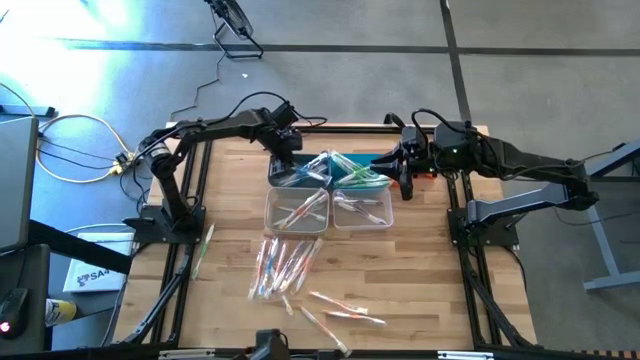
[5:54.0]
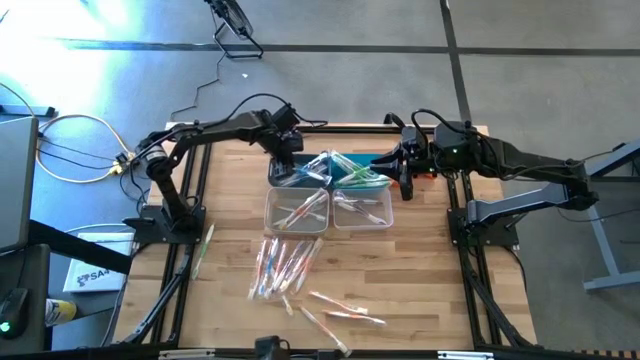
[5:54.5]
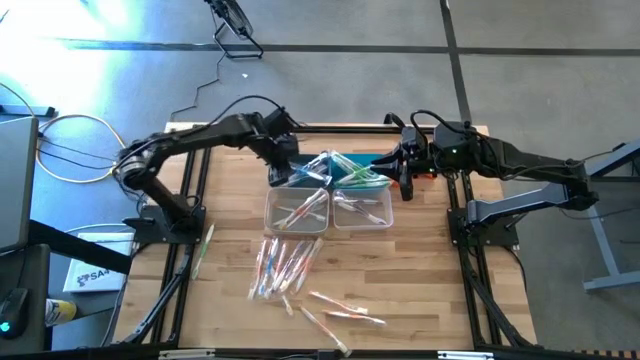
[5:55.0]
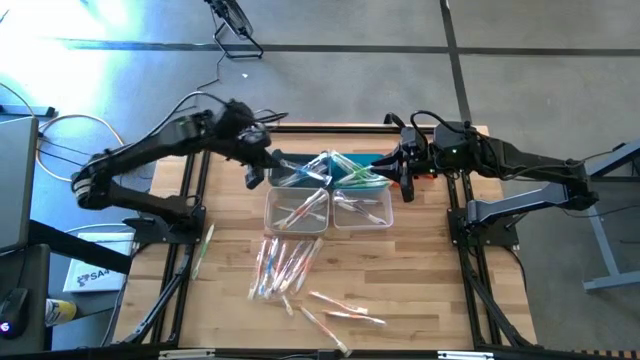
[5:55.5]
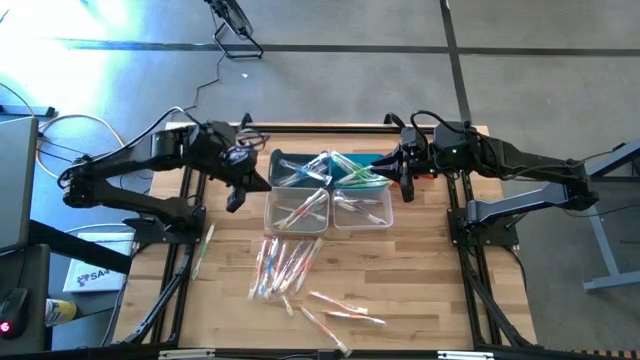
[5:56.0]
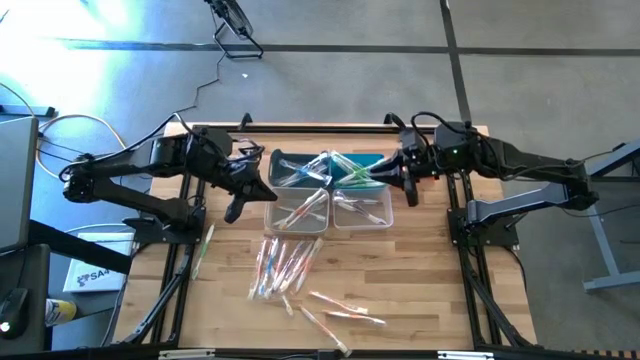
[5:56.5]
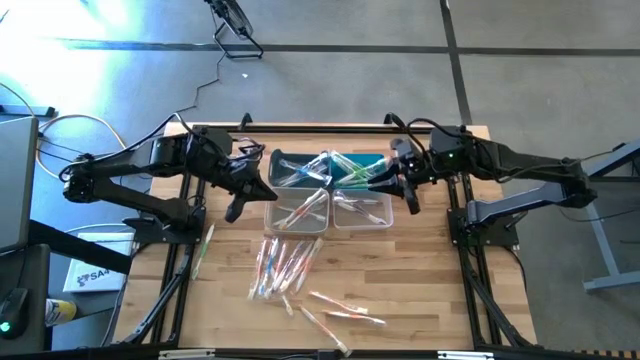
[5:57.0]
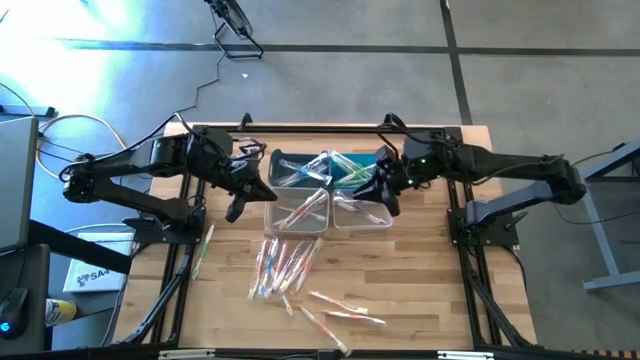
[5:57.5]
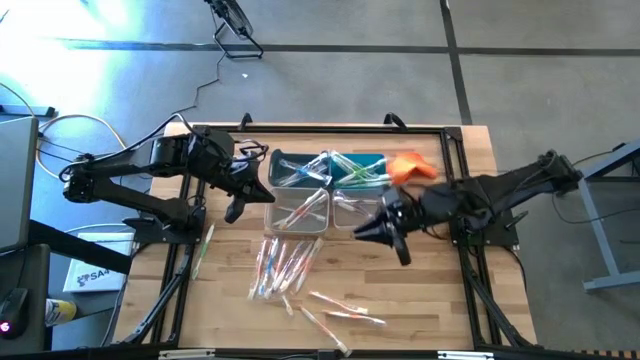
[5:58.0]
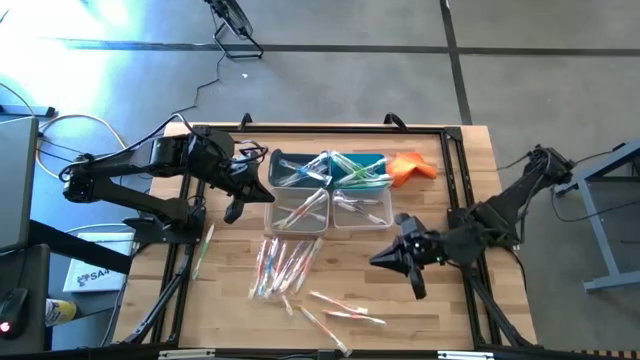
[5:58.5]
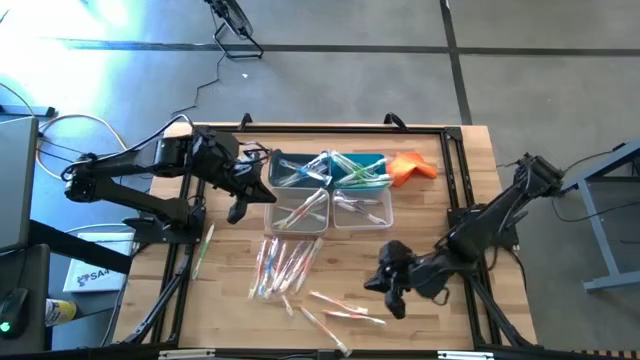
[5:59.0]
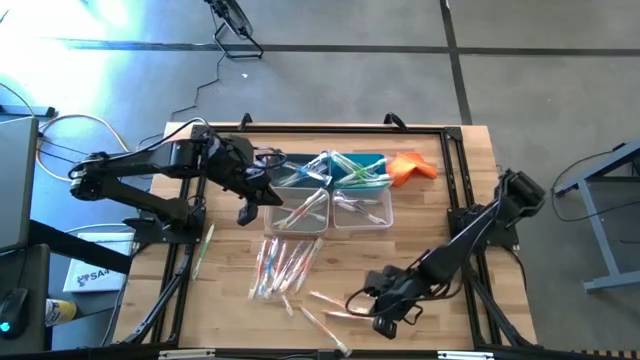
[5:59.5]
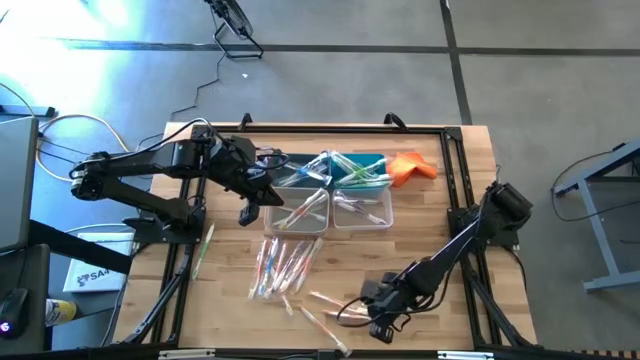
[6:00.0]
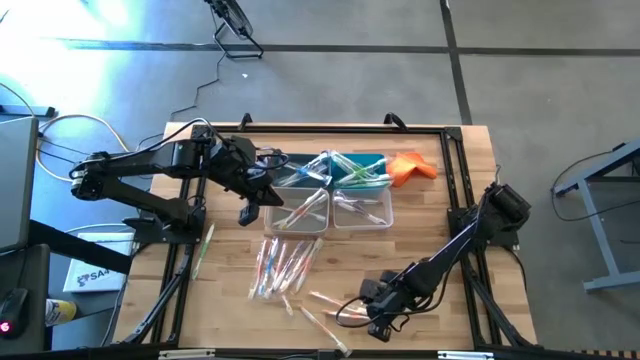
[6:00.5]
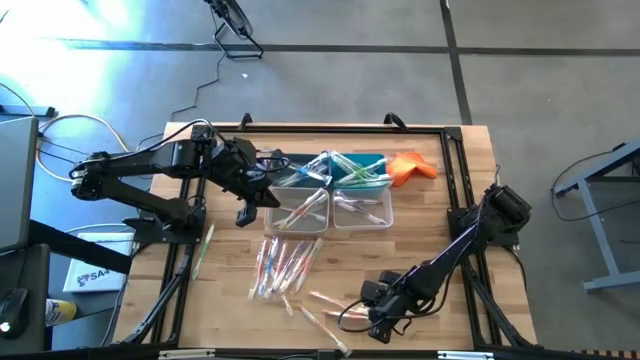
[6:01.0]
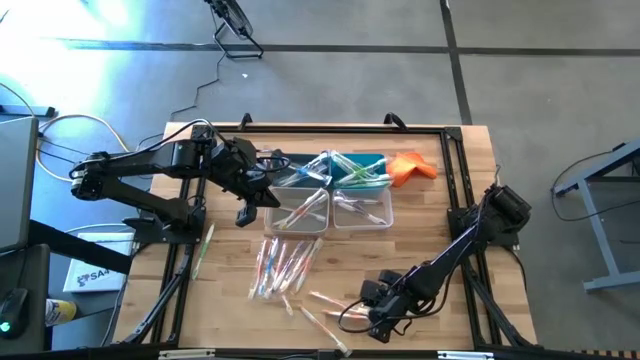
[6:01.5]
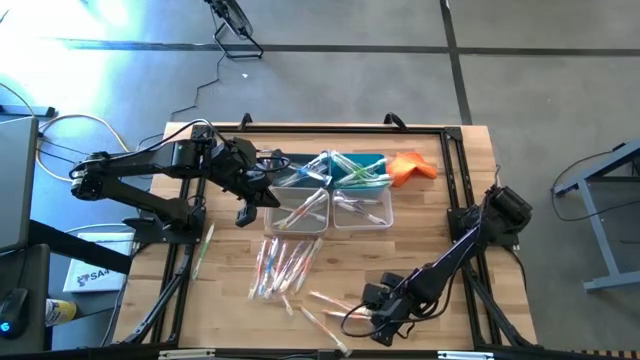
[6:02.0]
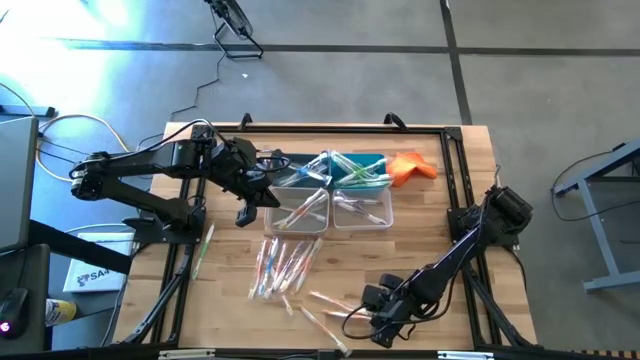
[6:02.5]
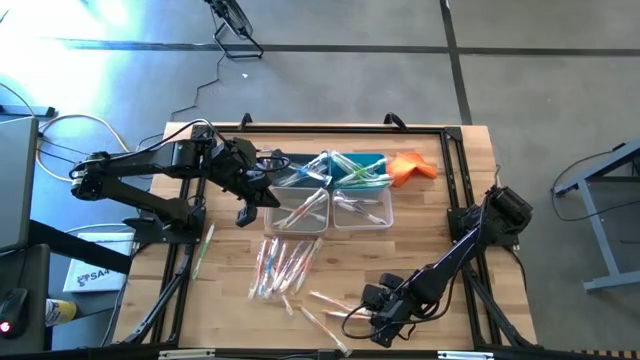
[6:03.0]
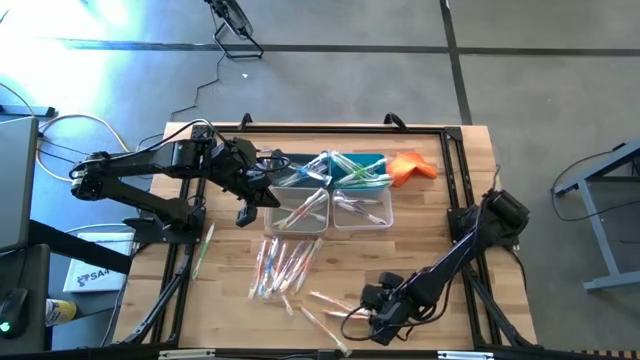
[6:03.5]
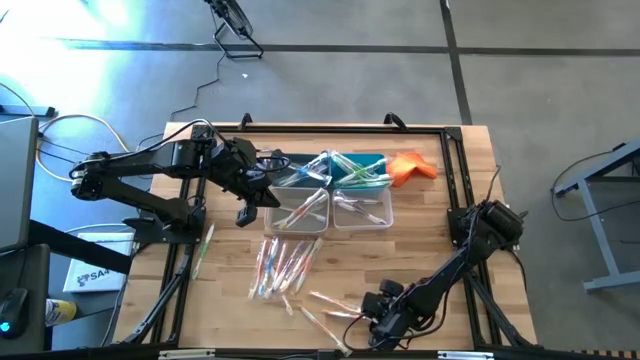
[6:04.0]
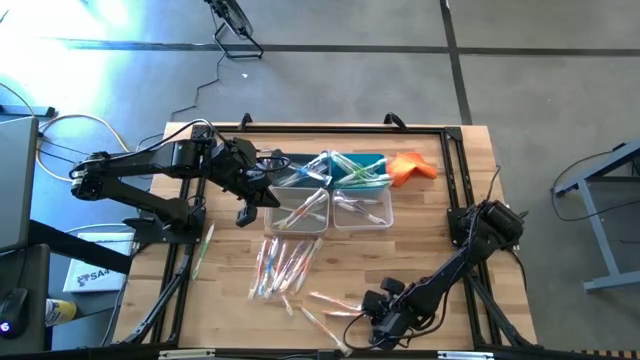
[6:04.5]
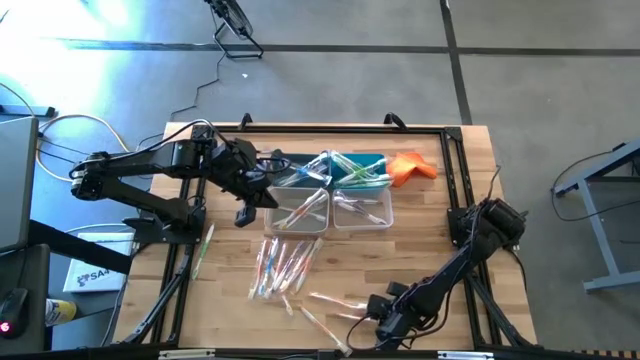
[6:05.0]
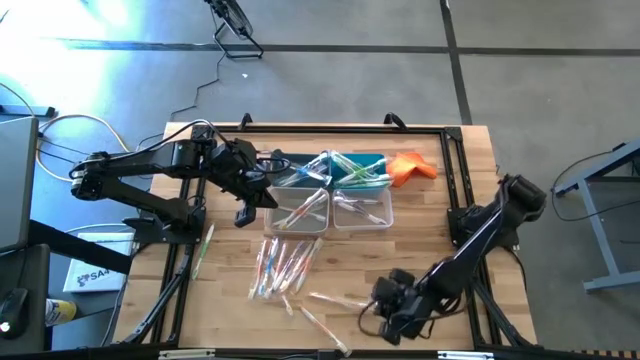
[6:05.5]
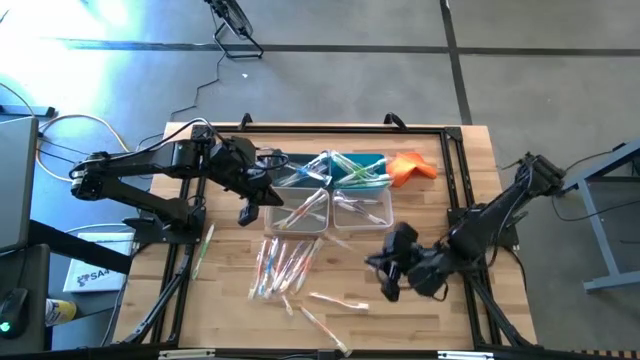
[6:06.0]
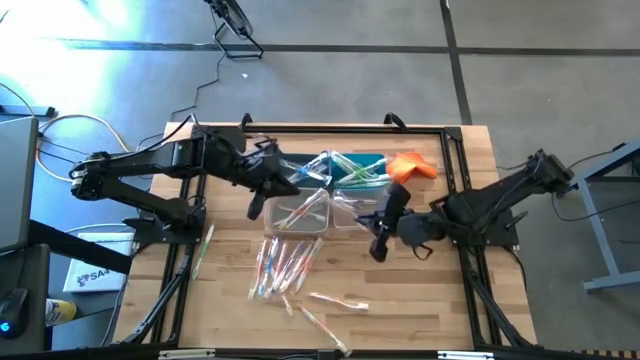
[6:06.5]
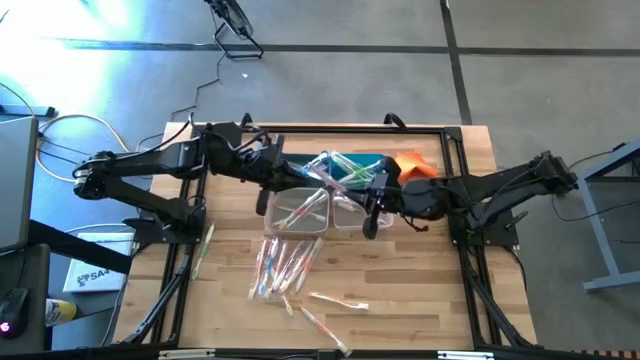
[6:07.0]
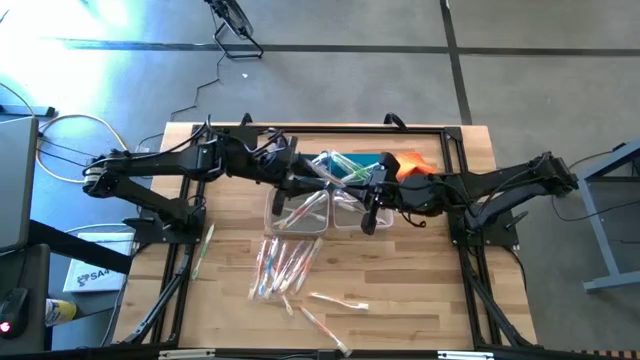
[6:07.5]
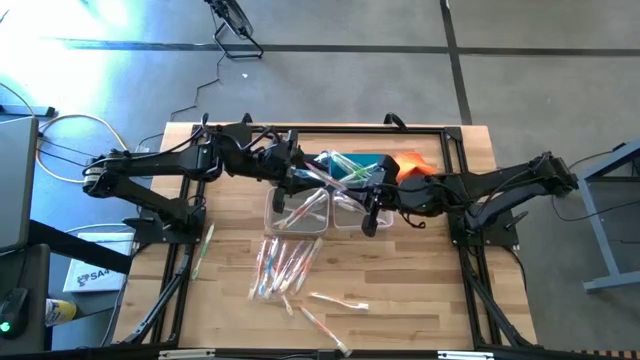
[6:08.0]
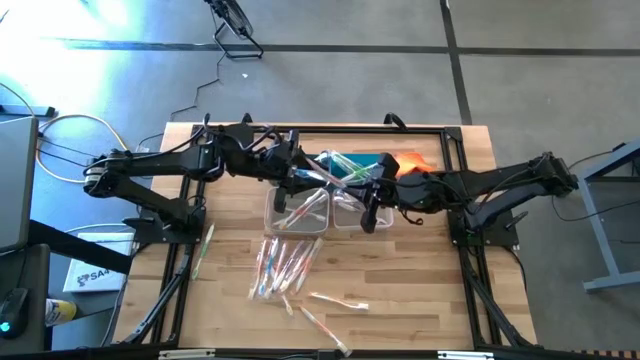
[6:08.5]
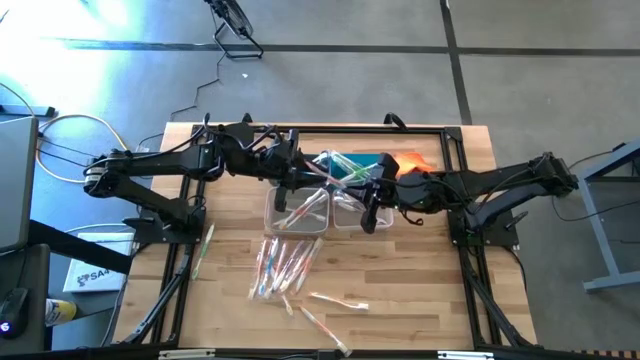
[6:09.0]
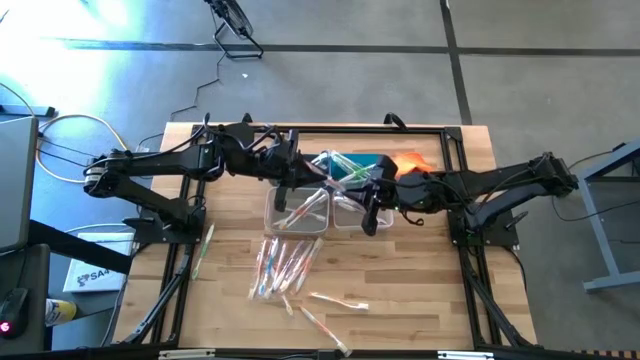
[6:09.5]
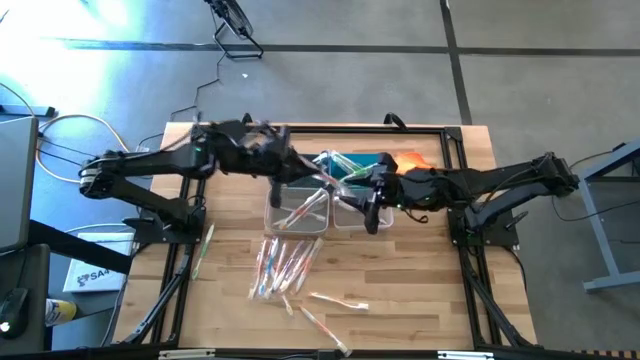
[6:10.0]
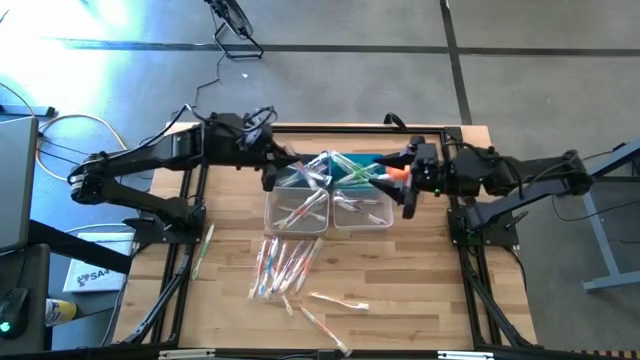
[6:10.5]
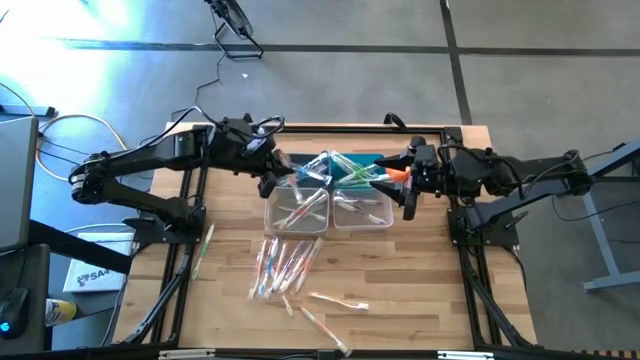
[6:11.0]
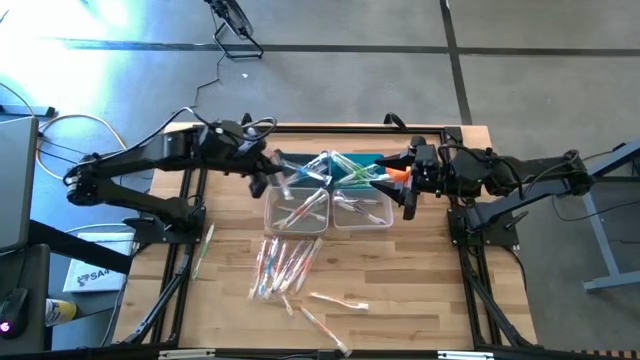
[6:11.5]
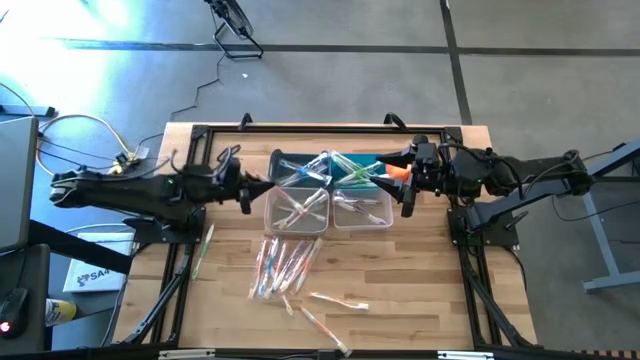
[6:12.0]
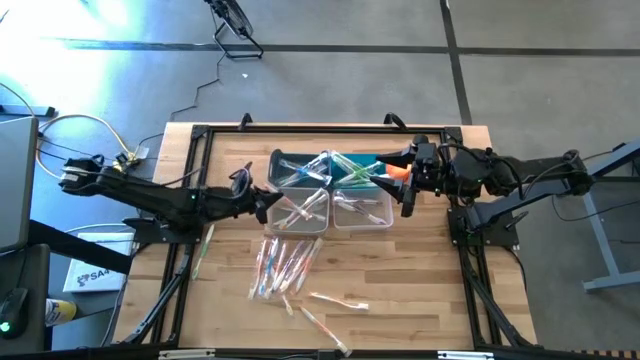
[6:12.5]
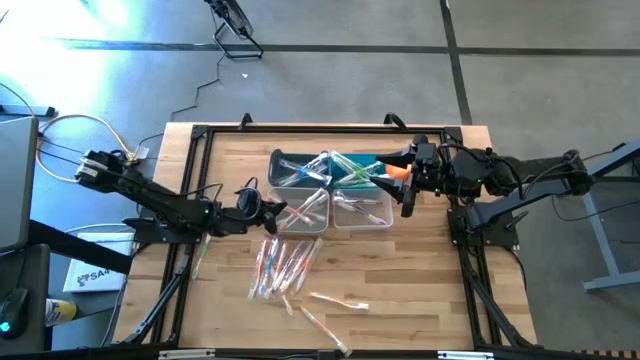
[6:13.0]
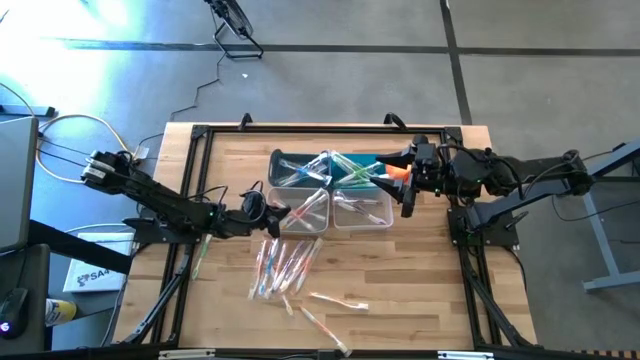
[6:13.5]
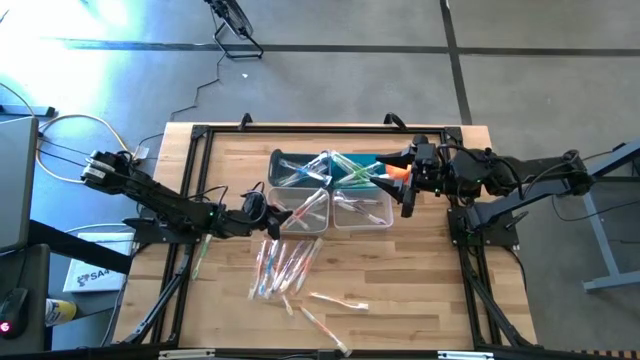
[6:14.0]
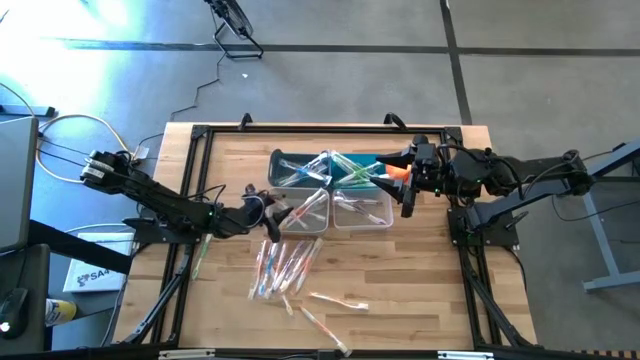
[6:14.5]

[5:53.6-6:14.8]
Task: Pick & Place Toothbrushes
Put the orange toothbrush into the gray bin
